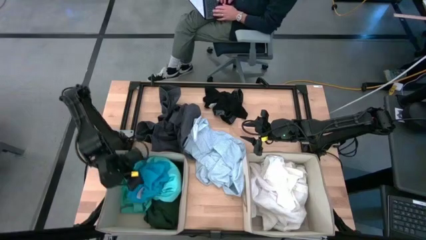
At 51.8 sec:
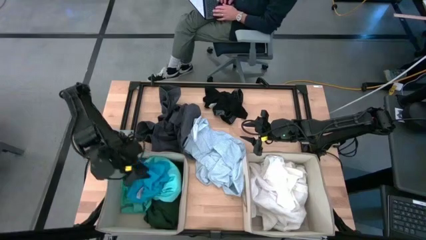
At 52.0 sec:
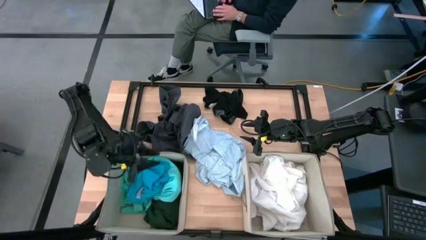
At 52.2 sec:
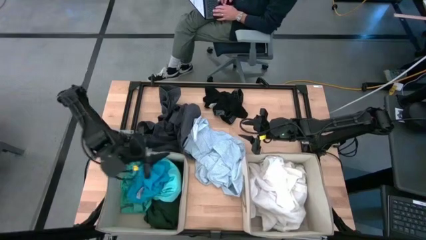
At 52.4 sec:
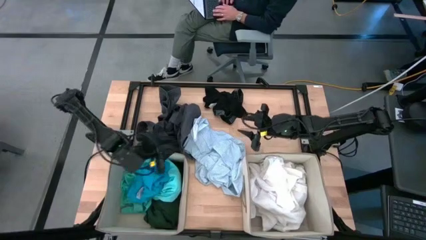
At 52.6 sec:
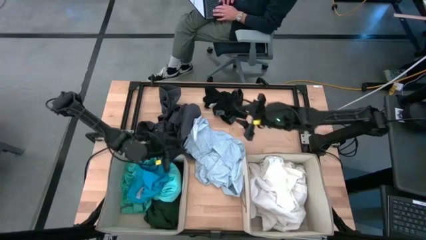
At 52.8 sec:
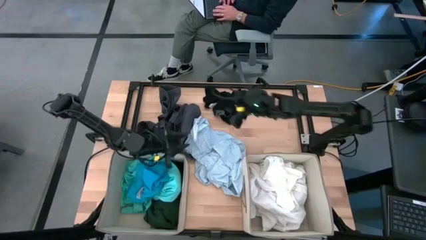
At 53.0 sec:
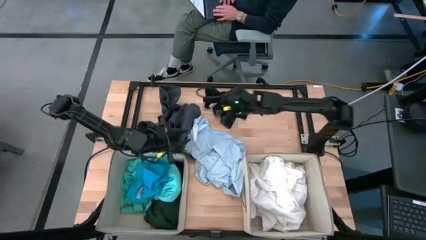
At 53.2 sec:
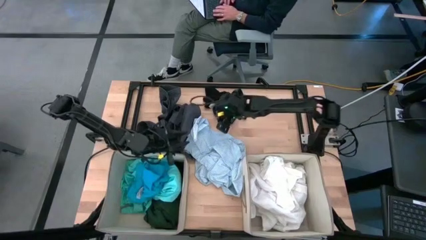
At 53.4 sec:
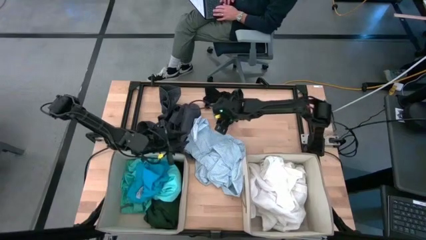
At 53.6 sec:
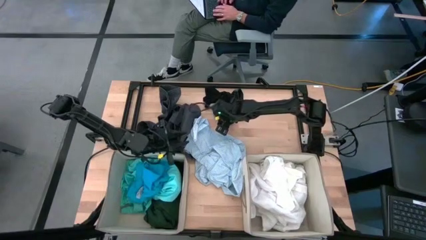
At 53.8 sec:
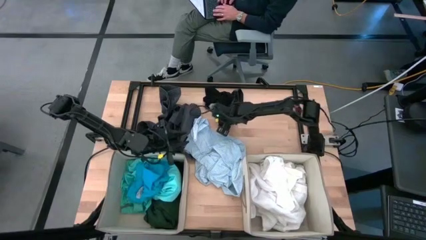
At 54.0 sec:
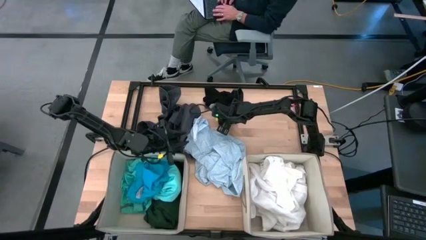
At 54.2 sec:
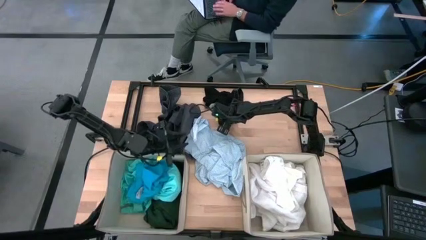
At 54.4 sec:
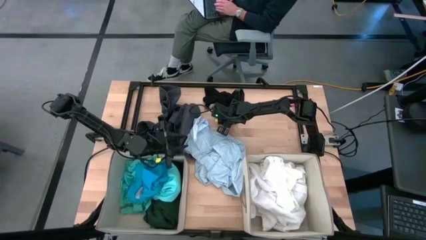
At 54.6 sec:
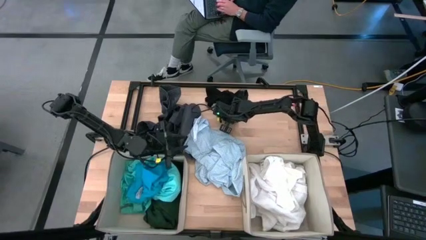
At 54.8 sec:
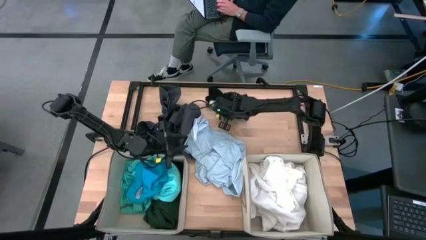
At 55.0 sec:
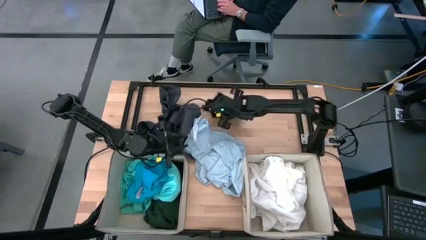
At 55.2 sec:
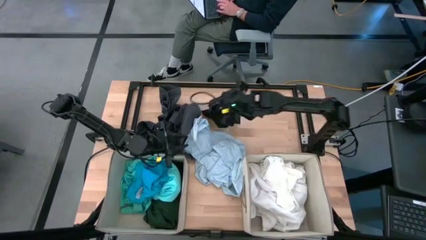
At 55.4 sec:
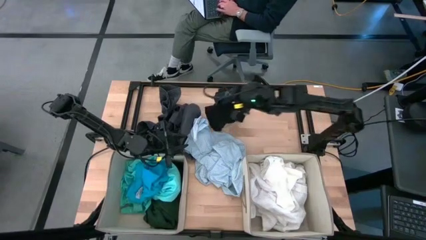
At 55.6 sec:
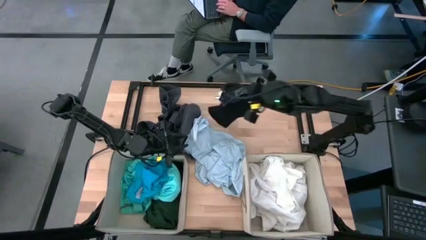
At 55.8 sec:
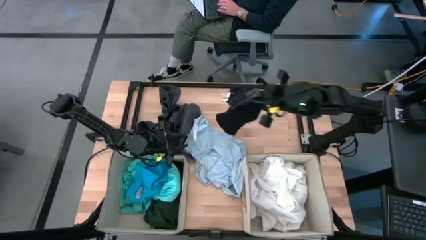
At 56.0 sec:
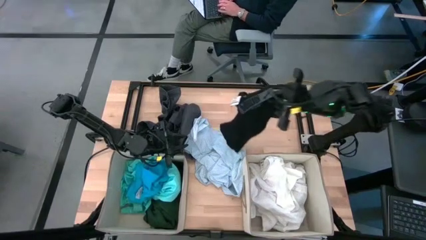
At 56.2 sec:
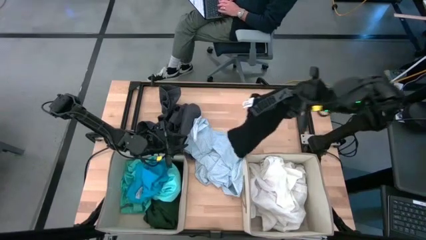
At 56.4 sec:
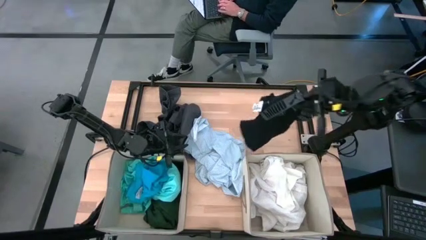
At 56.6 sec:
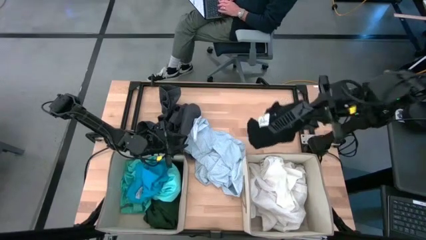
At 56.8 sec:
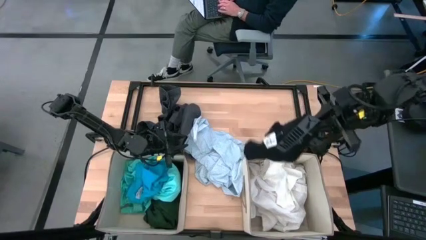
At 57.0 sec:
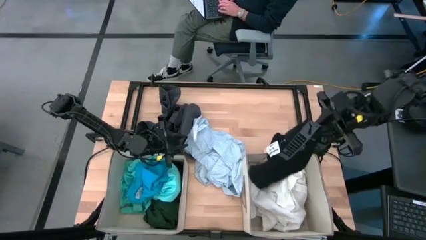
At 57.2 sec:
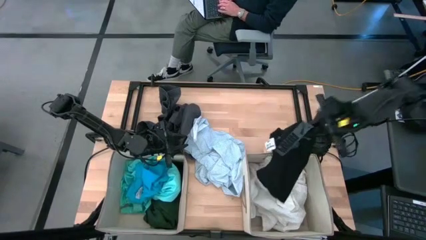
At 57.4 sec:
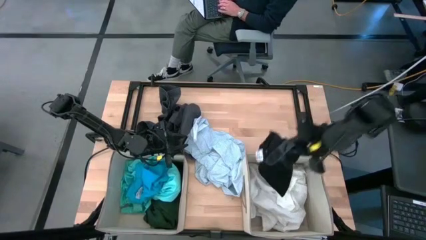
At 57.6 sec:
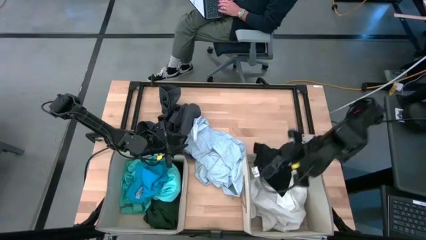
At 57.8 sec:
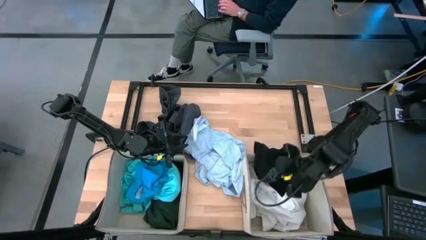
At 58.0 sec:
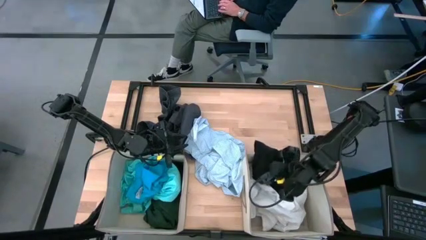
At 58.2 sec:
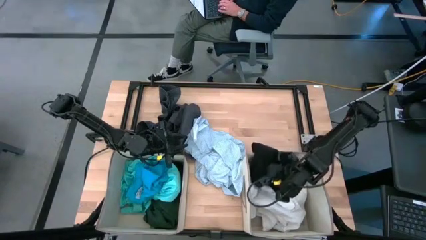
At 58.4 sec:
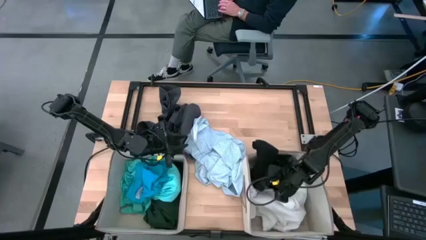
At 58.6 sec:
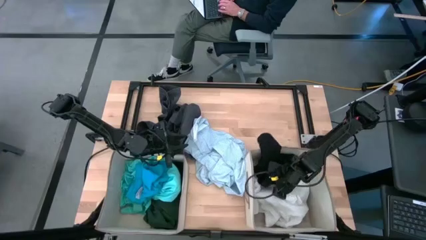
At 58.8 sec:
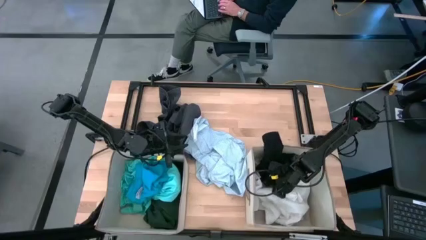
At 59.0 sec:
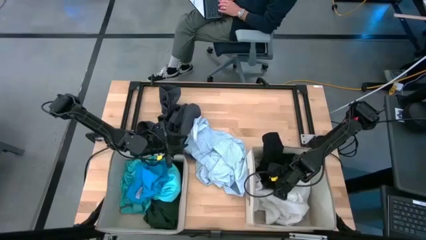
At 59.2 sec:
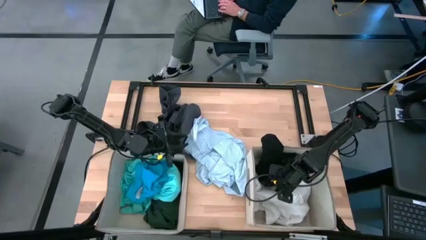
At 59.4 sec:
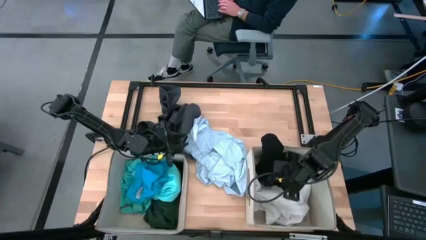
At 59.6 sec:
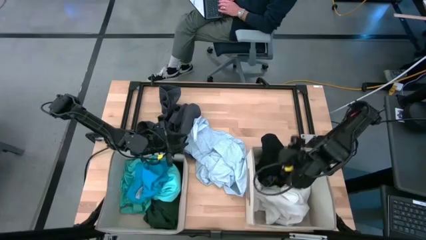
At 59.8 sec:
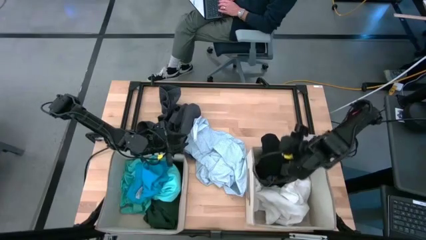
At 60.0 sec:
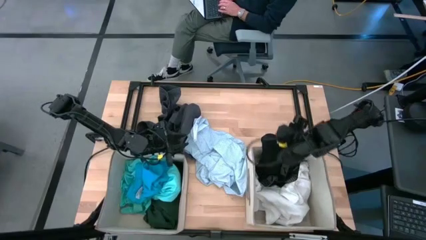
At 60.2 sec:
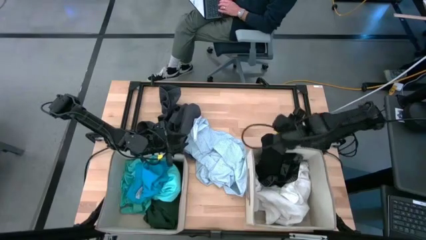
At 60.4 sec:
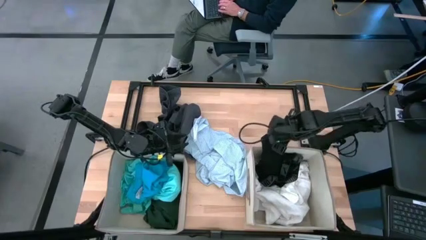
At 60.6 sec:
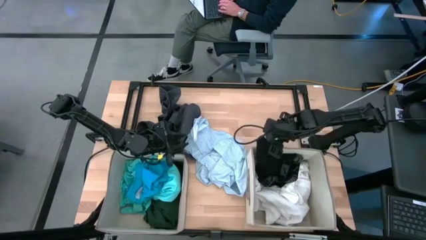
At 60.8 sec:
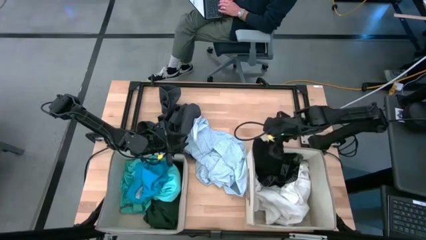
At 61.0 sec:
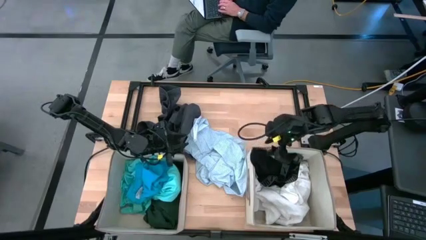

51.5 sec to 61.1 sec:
Task: Sort clothes
Put the black boxer into the right brown laundry organizer

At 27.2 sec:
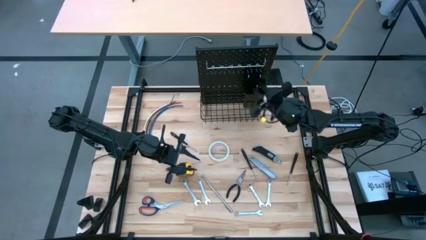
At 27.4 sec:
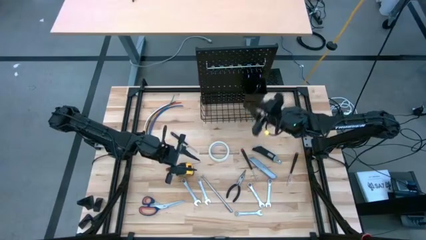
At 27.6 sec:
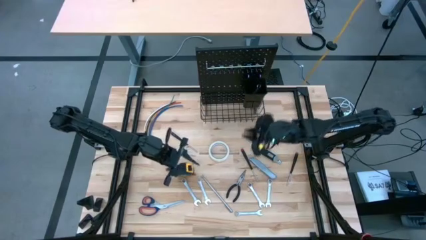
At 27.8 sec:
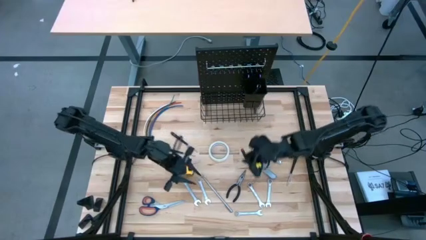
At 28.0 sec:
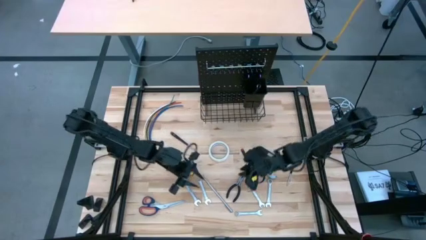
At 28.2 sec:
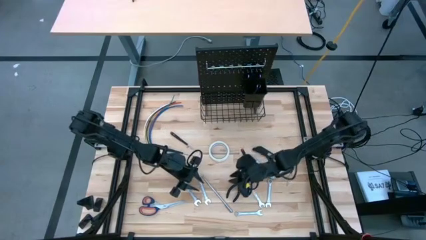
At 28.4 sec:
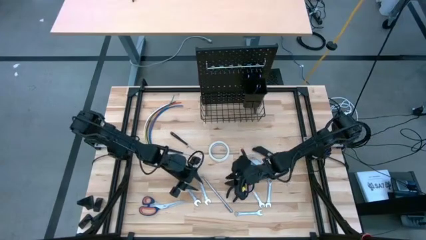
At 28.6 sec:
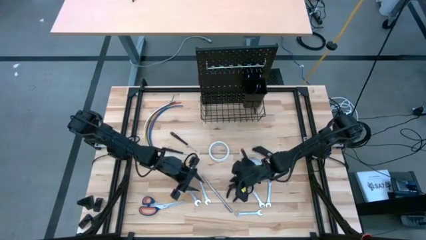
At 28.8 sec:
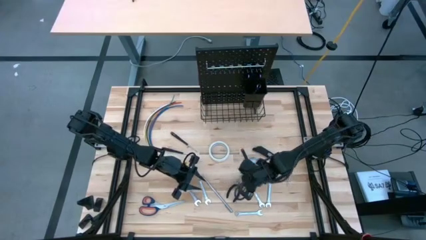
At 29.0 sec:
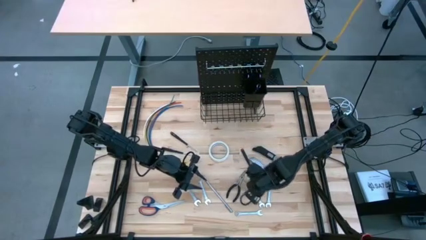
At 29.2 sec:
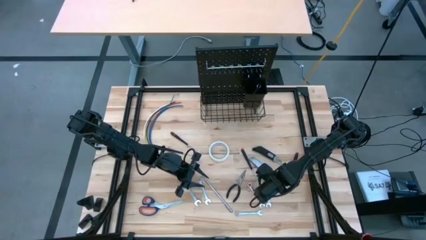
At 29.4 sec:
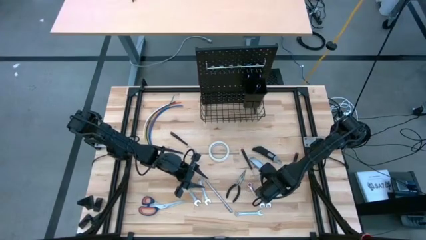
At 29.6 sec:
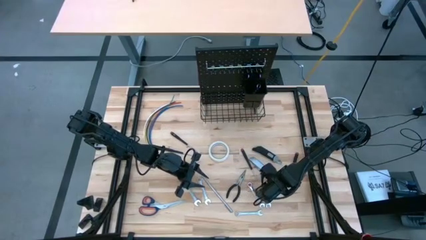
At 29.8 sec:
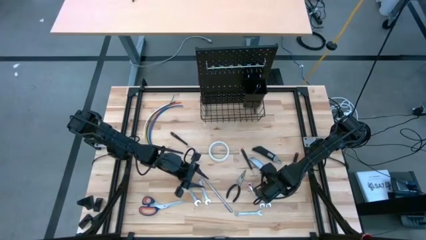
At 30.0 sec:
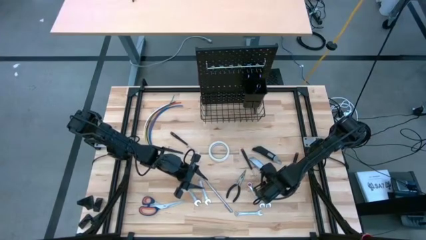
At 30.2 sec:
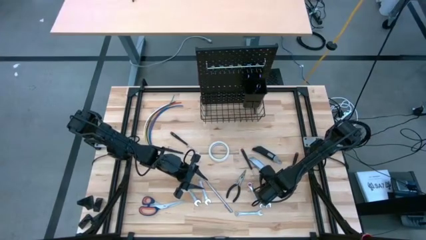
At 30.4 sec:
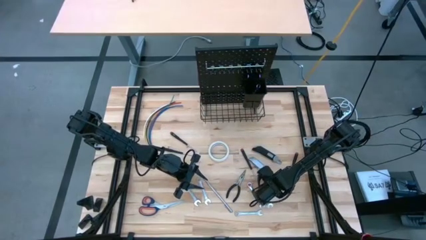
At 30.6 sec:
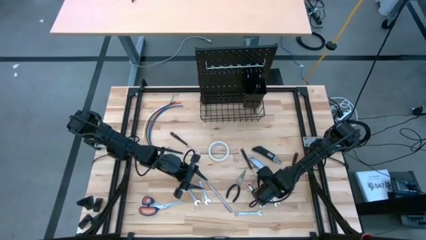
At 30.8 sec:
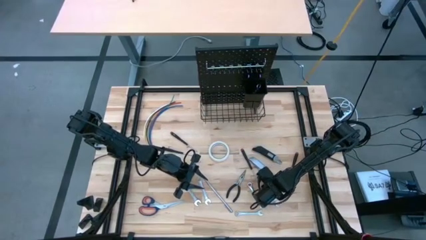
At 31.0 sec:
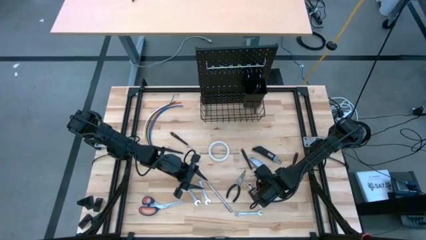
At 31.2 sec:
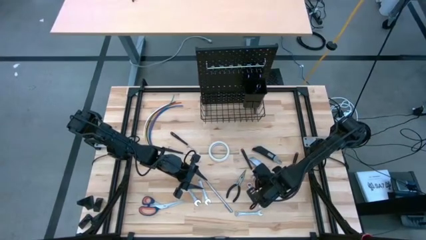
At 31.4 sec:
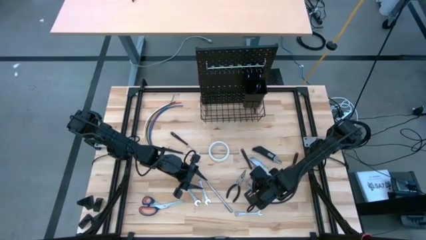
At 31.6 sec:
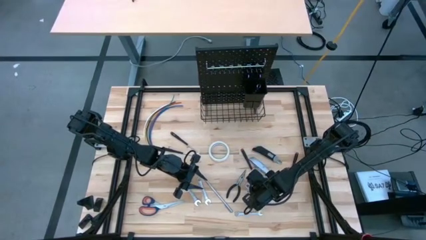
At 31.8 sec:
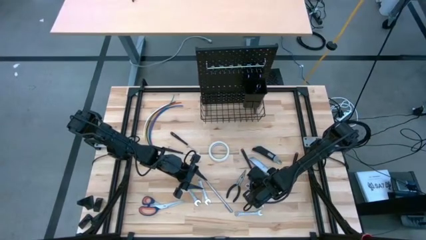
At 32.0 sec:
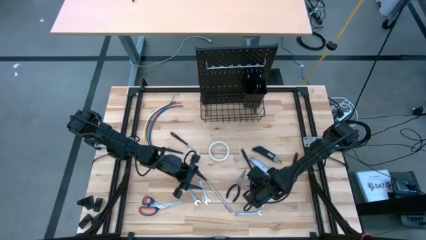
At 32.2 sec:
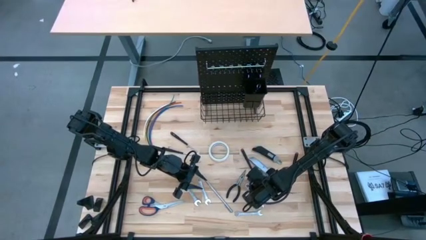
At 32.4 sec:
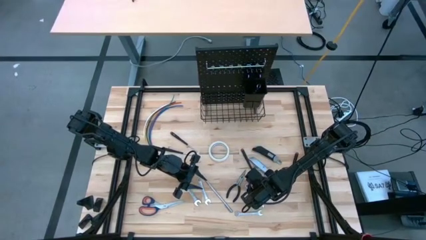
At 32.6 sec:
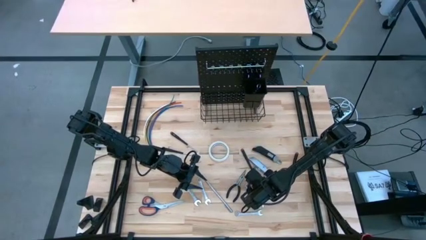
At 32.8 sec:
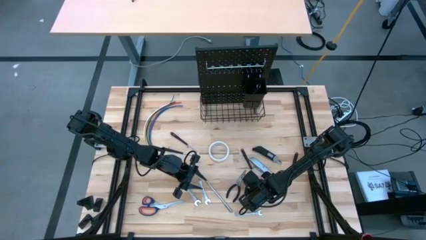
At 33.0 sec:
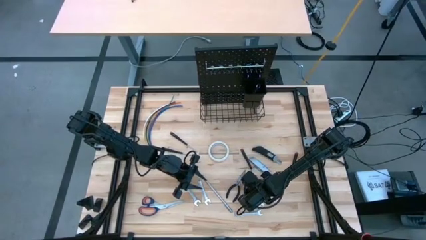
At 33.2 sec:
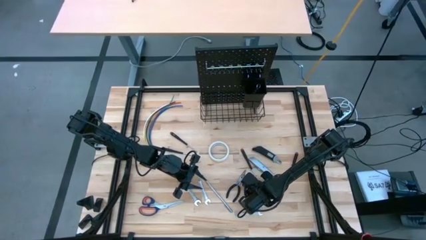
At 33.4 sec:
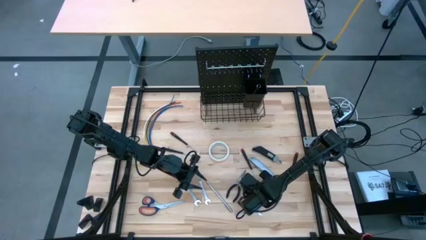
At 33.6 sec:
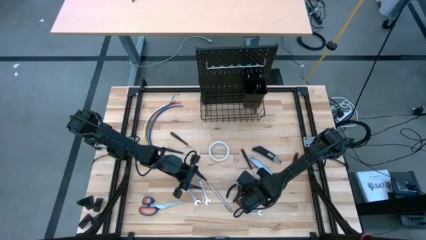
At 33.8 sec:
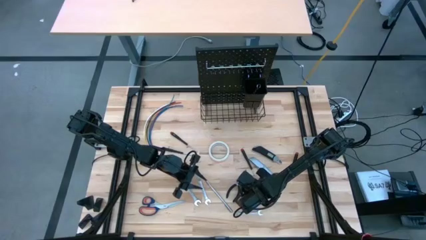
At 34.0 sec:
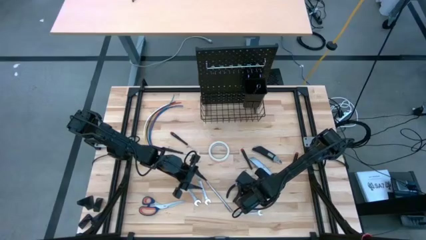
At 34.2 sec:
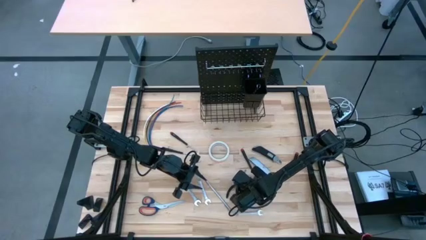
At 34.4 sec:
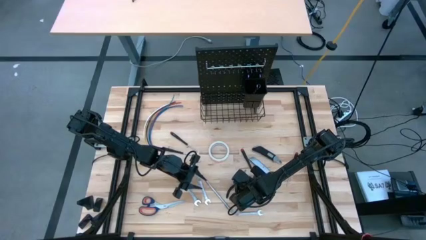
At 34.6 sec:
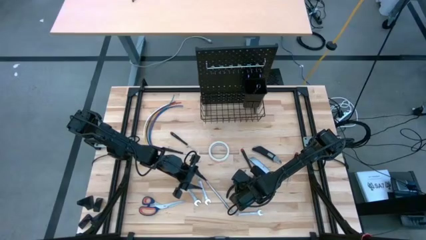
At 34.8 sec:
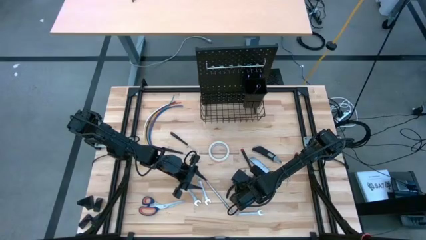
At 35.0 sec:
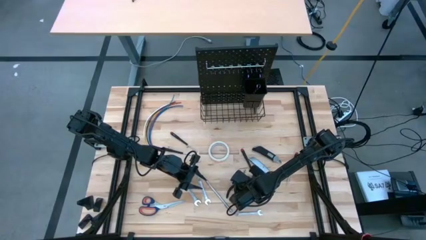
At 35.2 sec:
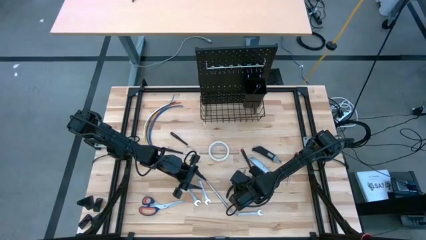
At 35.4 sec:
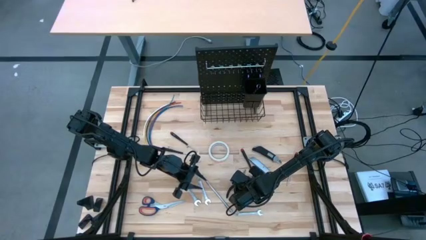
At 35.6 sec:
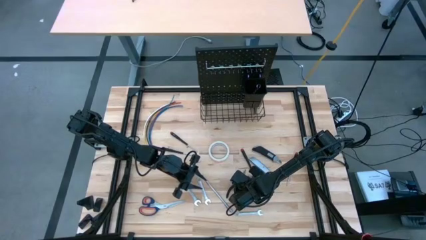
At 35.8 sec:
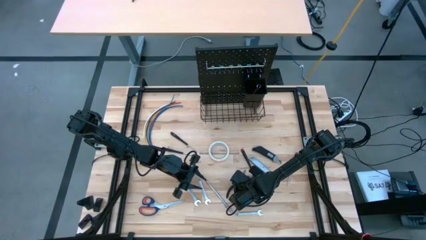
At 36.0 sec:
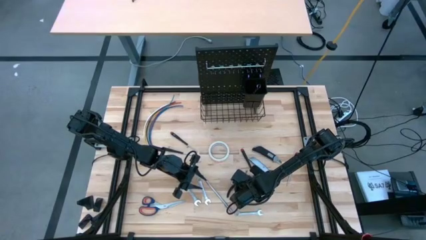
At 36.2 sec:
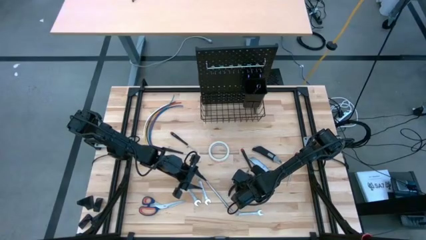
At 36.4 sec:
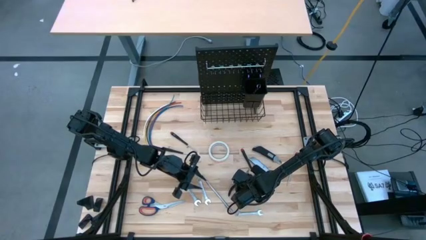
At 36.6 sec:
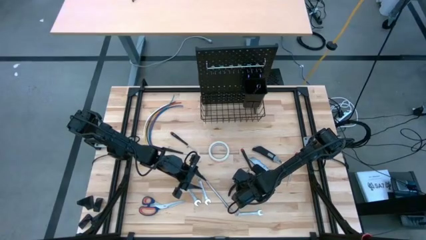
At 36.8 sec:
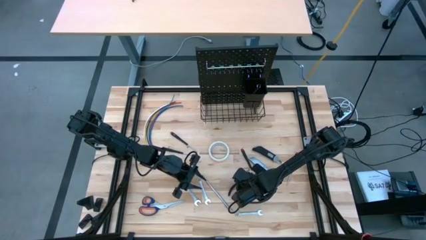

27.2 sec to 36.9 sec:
Task: Hang tools onto peg board
Put the wrench into the black bin on the peg board
